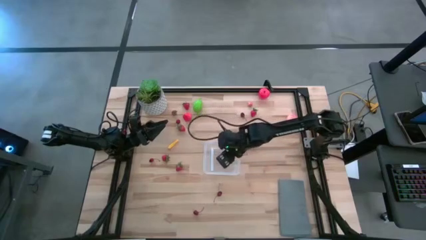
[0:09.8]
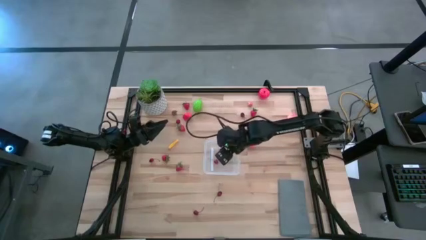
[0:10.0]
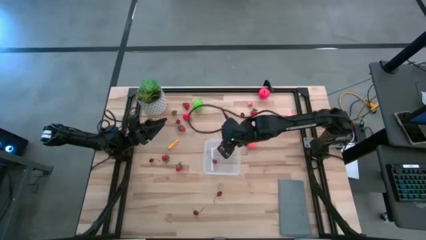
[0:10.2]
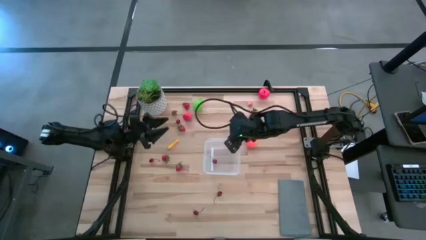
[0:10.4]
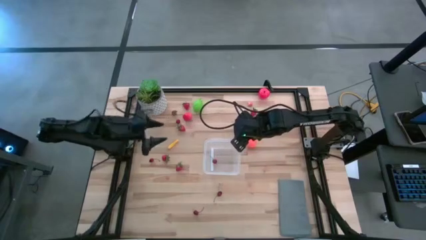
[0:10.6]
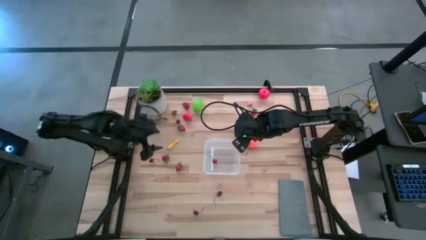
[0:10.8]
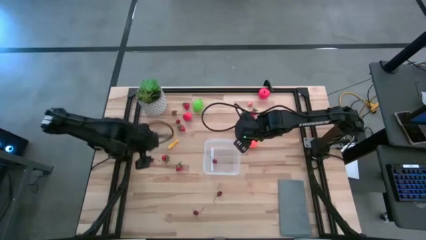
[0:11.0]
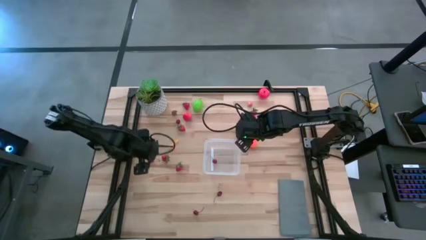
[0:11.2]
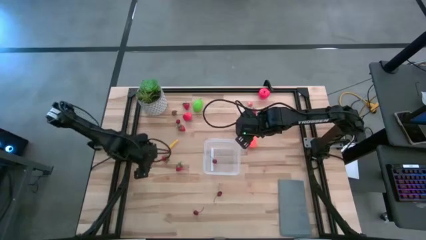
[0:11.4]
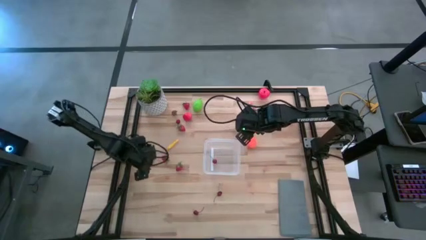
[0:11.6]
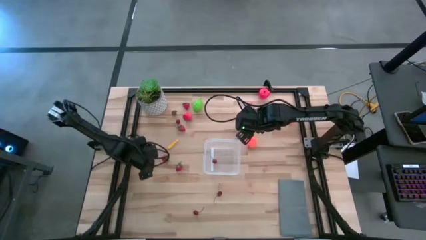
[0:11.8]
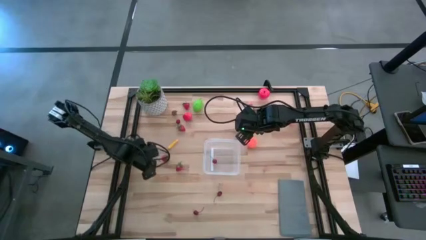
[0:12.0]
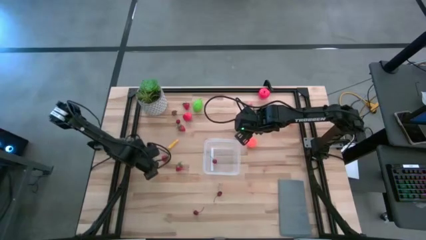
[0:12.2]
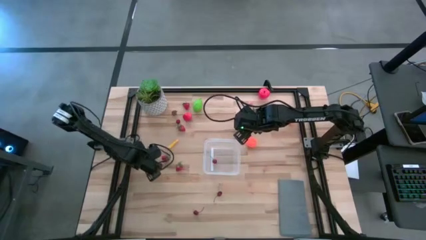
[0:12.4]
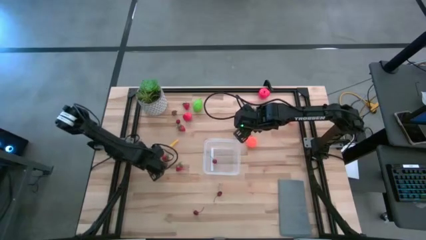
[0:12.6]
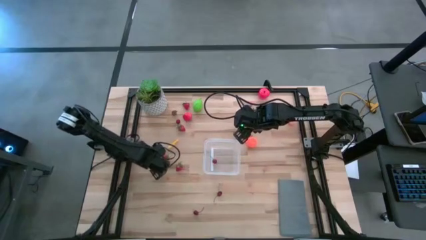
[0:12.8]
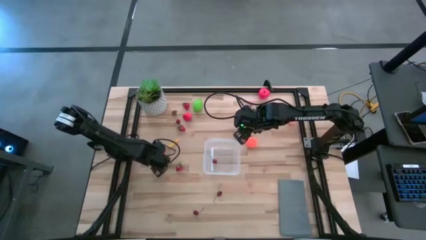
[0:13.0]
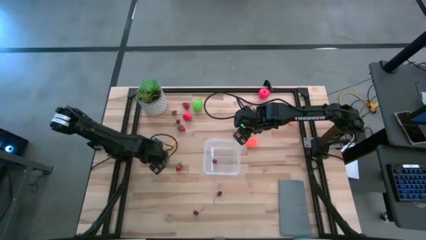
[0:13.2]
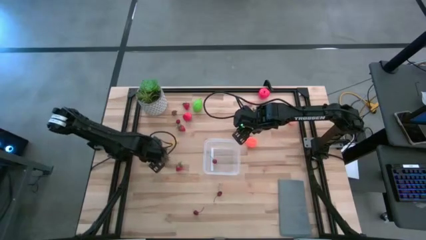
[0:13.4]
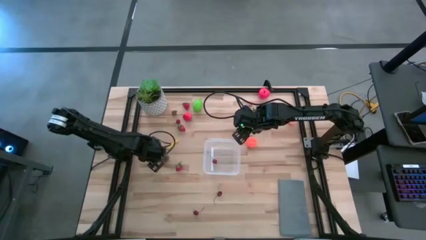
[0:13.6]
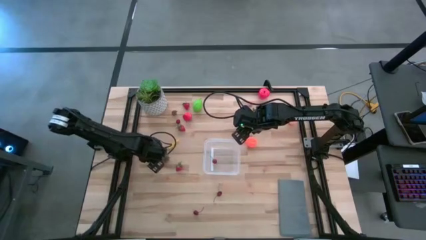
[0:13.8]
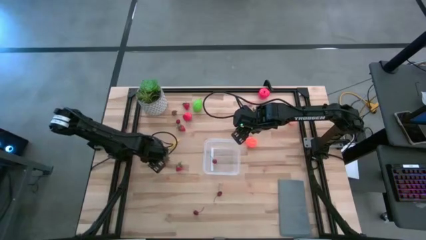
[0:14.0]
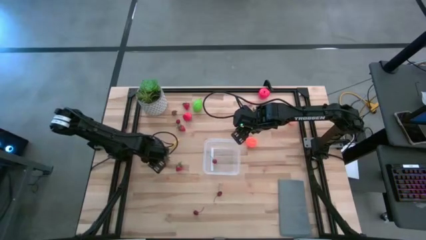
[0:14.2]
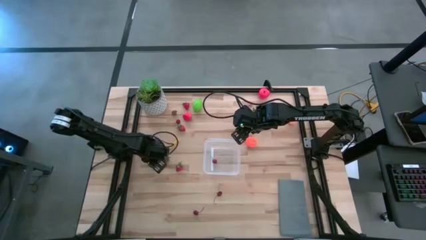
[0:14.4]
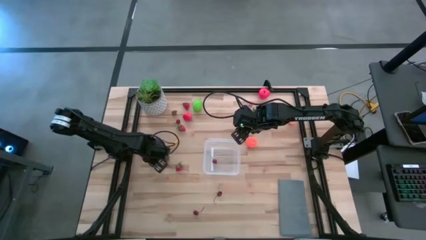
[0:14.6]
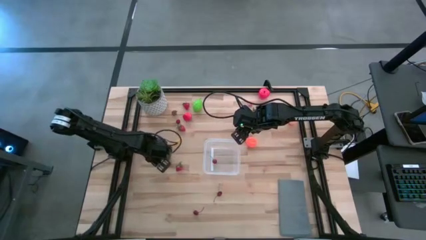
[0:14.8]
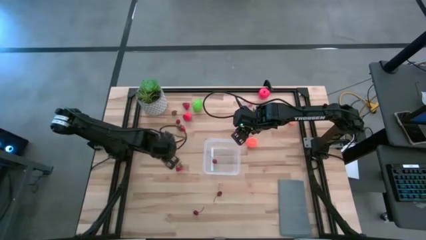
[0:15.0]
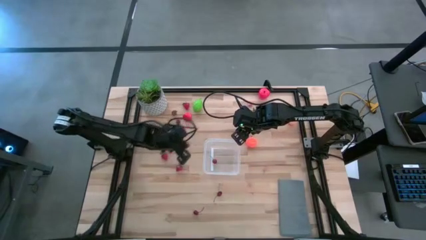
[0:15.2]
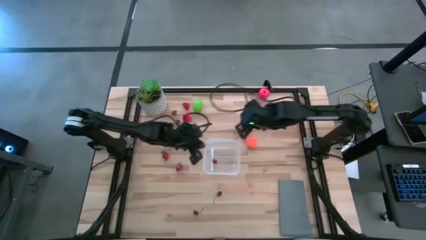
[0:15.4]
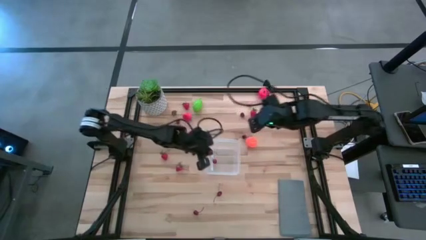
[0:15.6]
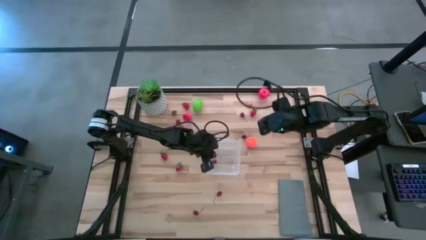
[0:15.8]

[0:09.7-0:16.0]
Task: Pick and placing Produce into tupperware
Put the red cherry into the transparent container

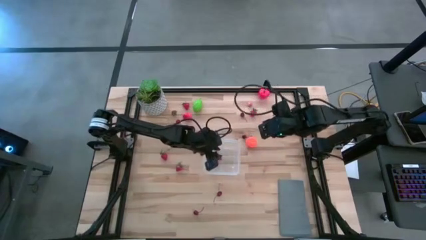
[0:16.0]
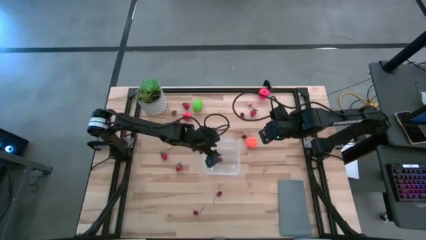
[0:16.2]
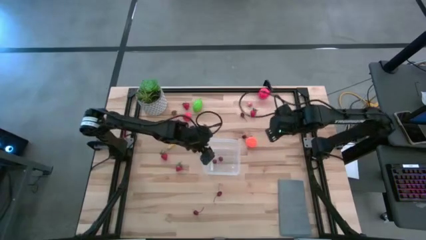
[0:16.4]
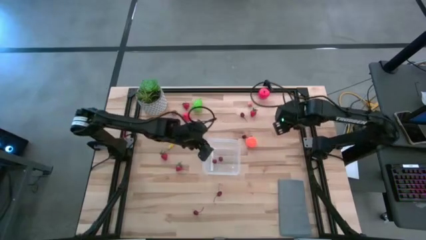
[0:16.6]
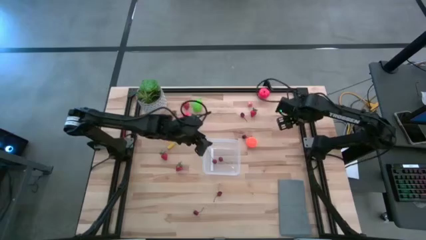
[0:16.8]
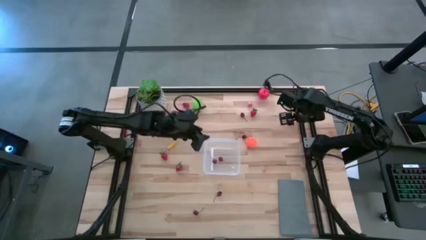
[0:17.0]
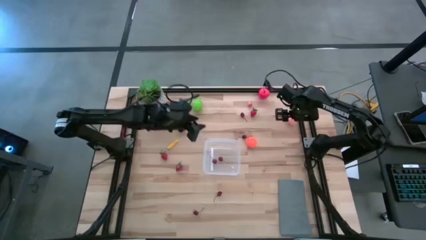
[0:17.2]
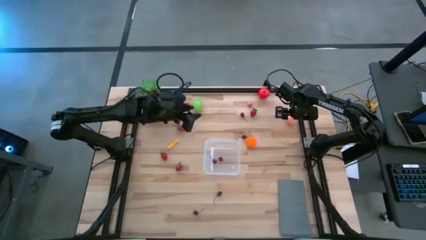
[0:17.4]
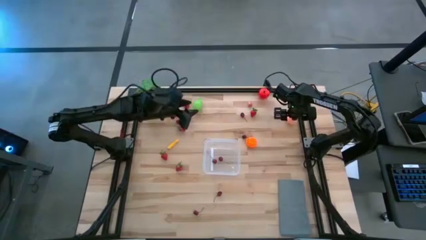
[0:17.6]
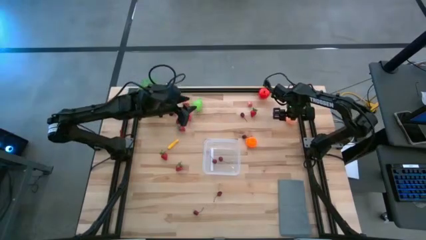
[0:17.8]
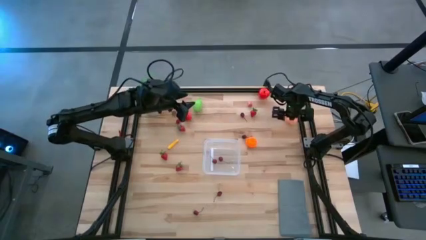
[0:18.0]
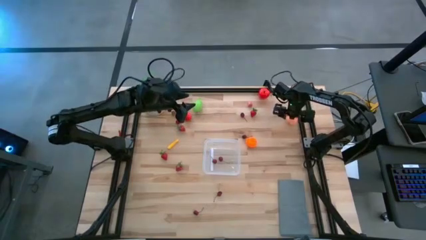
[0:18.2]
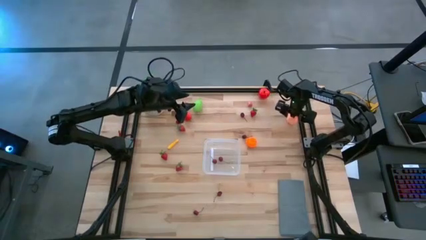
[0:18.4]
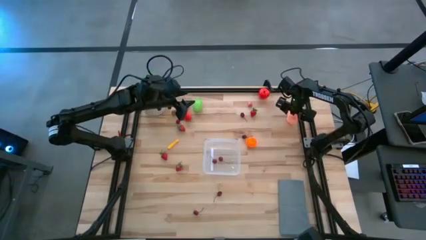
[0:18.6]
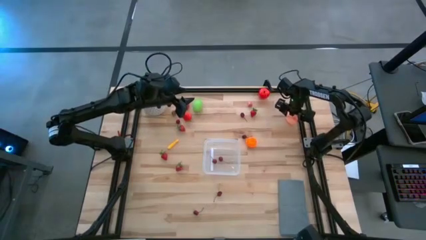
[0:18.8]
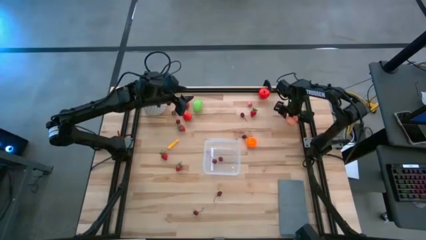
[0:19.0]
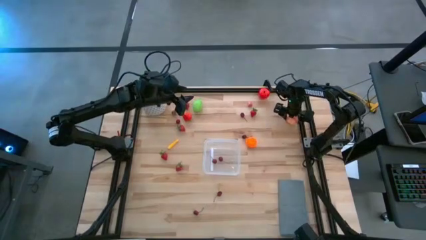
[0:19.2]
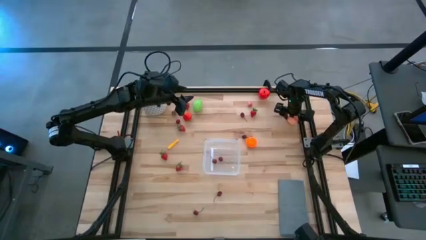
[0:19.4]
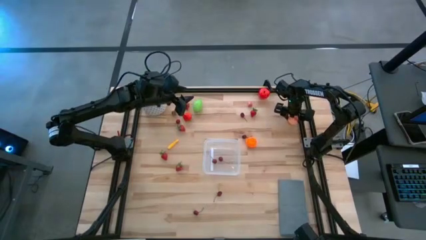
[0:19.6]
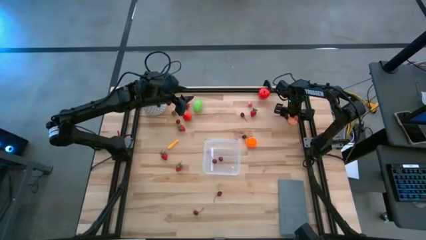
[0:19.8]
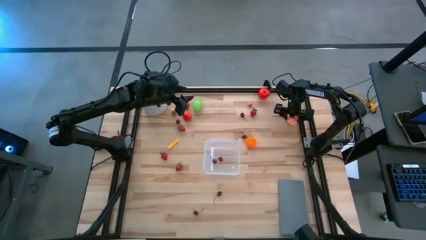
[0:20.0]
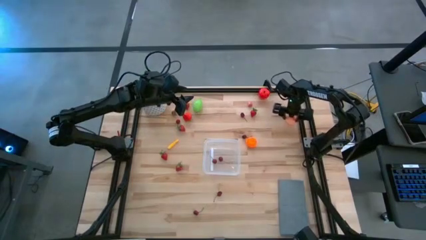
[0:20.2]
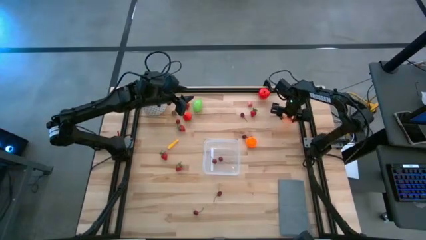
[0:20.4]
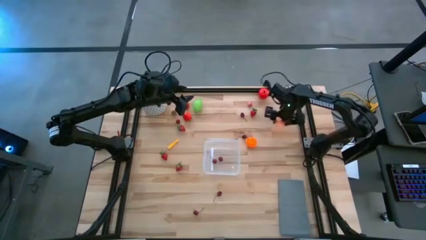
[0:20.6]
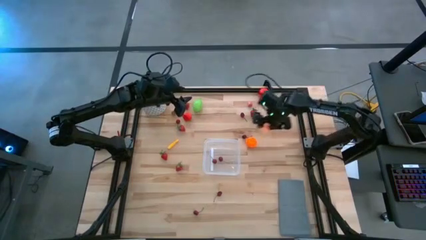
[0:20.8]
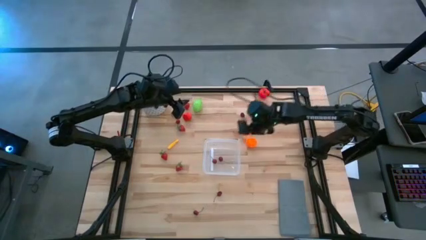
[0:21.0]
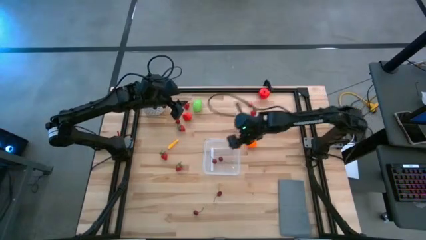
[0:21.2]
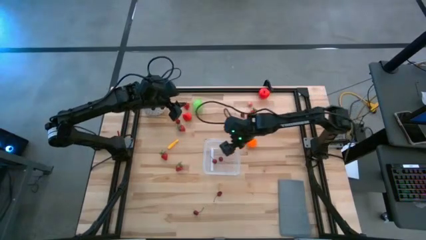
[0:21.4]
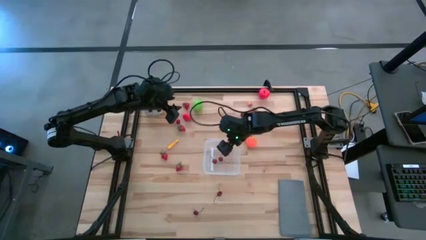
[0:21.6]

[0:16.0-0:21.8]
Put the pink peach into the transparent container

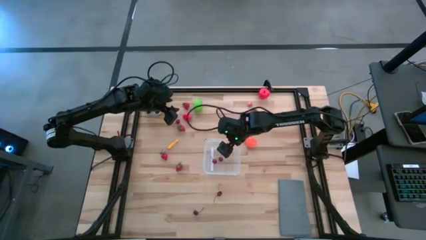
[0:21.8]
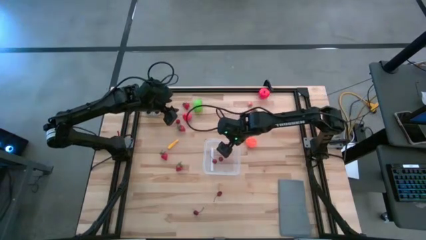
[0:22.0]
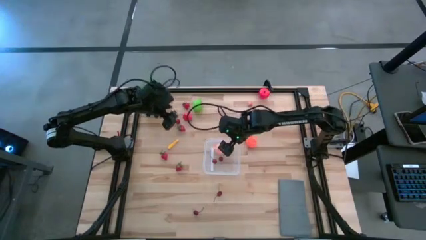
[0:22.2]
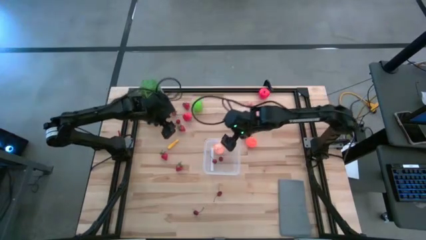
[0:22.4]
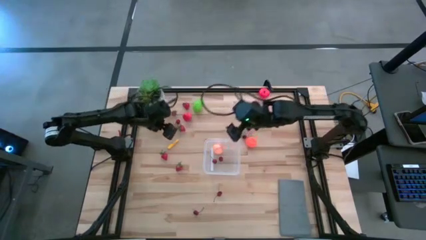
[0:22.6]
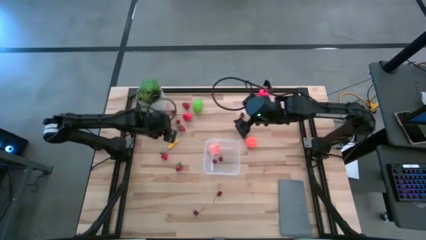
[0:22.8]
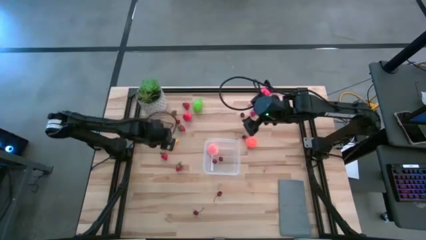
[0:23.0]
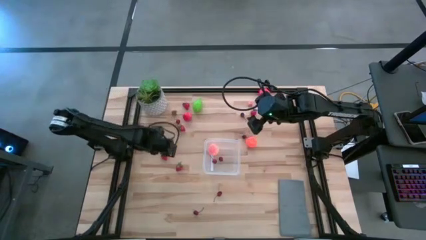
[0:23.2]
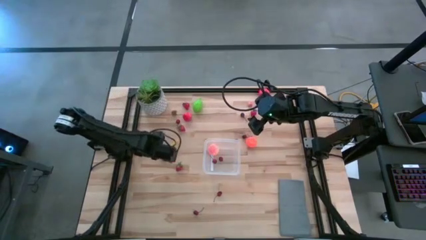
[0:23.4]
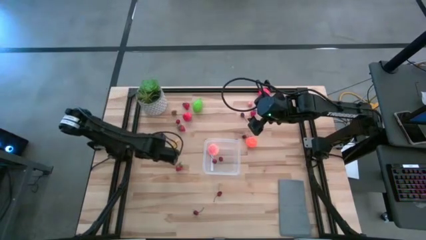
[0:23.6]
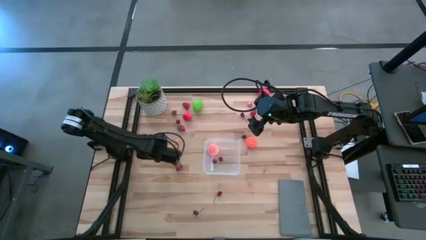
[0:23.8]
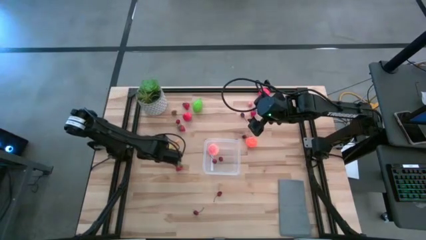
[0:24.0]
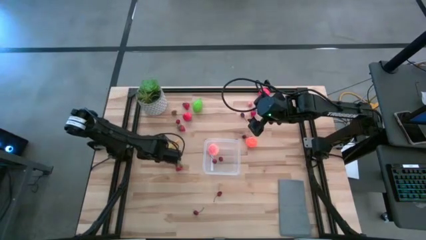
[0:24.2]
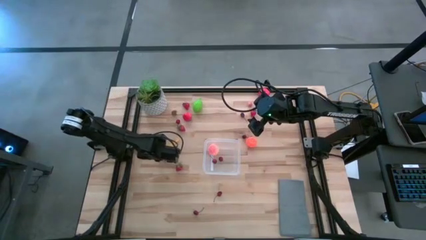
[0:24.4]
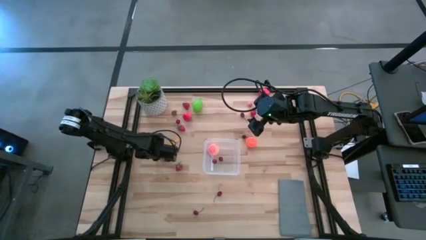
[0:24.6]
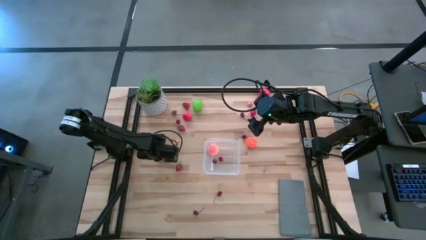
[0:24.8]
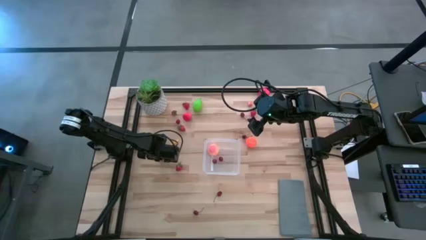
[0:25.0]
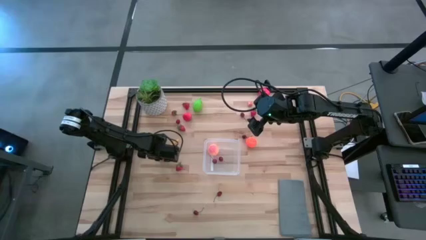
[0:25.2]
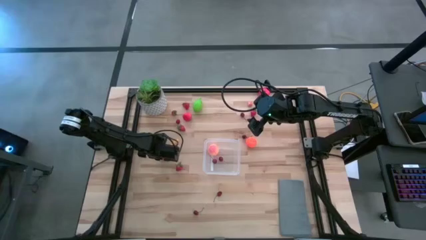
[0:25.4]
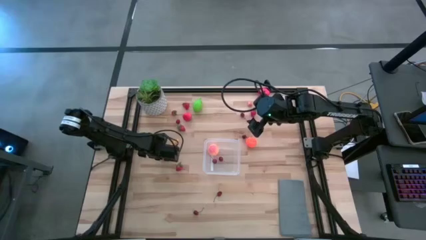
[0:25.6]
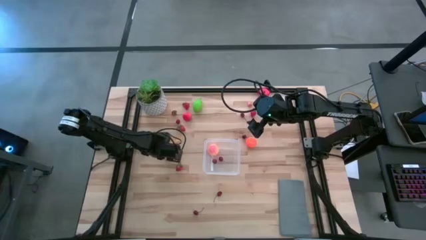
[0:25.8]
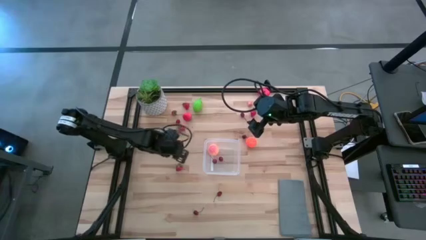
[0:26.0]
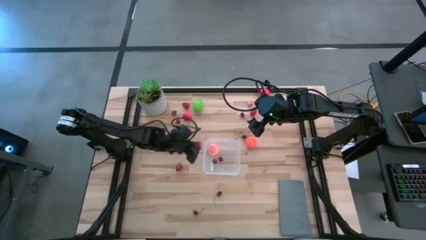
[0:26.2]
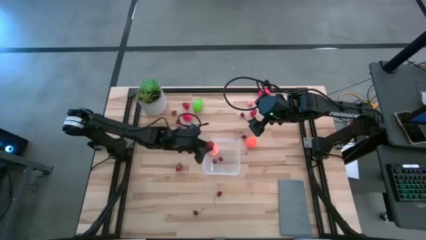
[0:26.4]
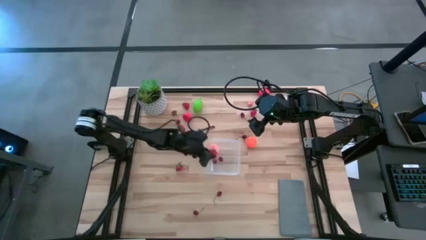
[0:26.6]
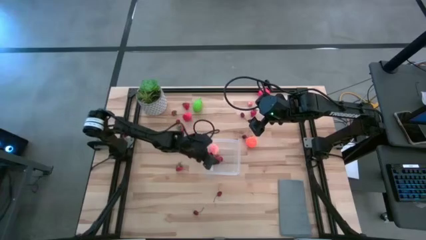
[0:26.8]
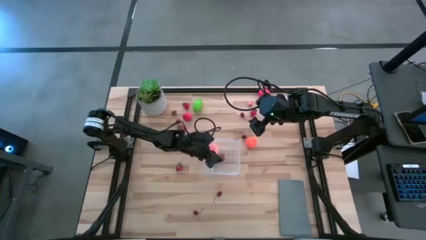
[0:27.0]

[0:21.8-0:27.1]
Put the red strawberry into the transparent container
